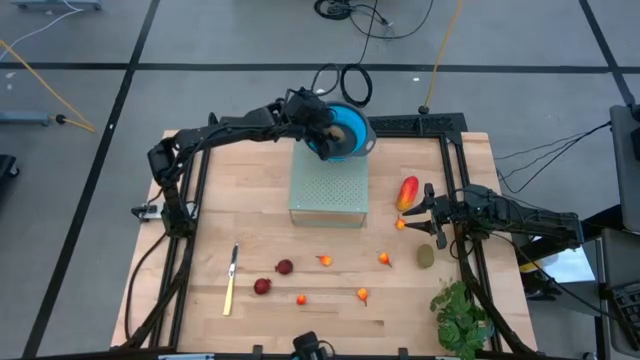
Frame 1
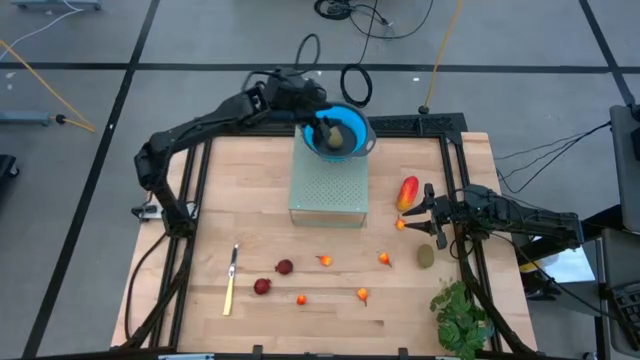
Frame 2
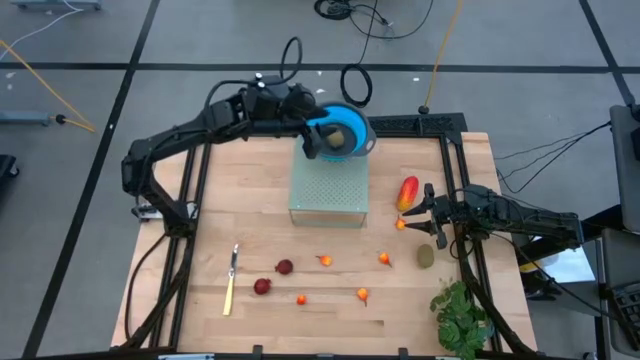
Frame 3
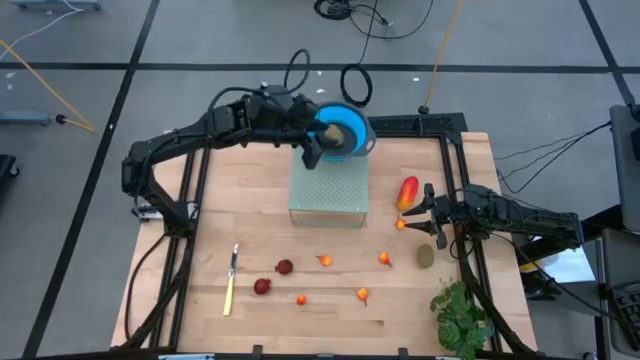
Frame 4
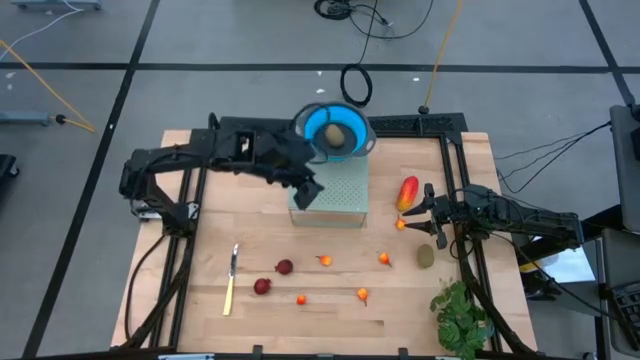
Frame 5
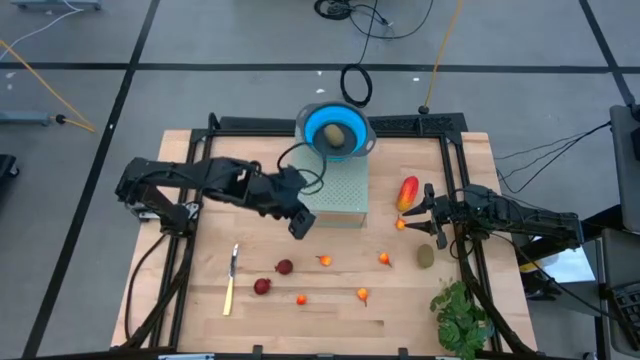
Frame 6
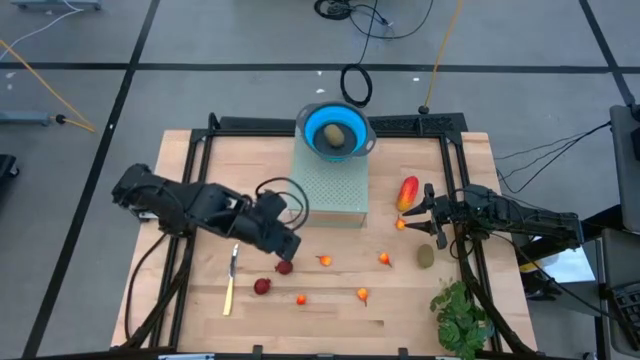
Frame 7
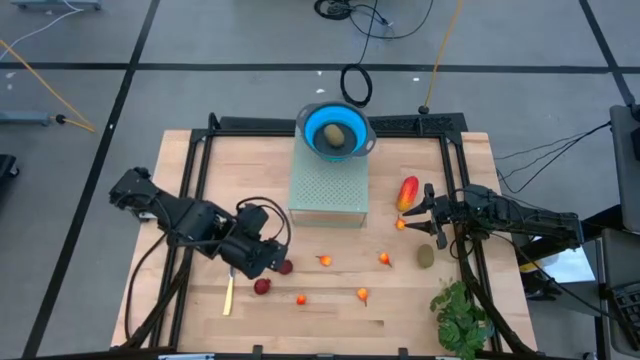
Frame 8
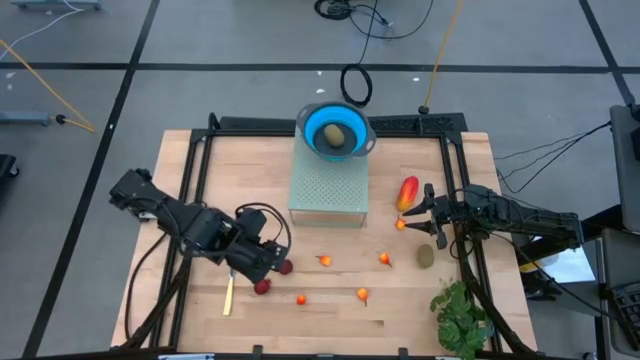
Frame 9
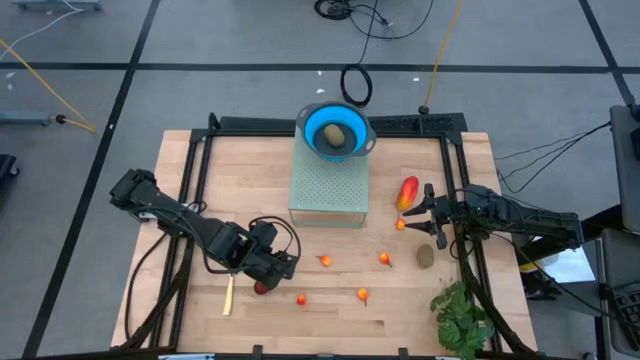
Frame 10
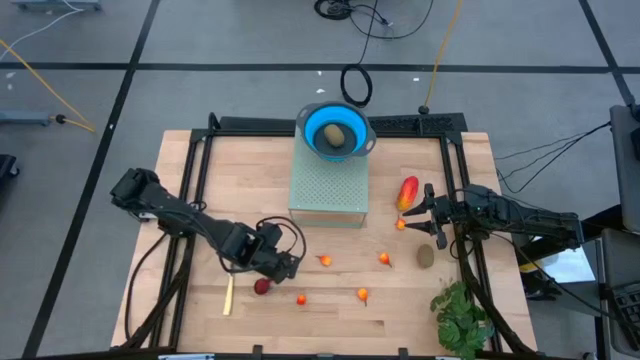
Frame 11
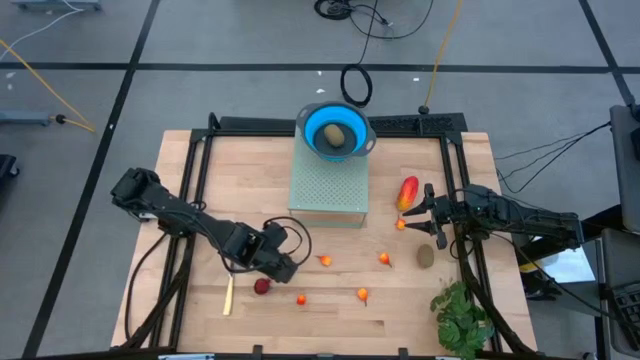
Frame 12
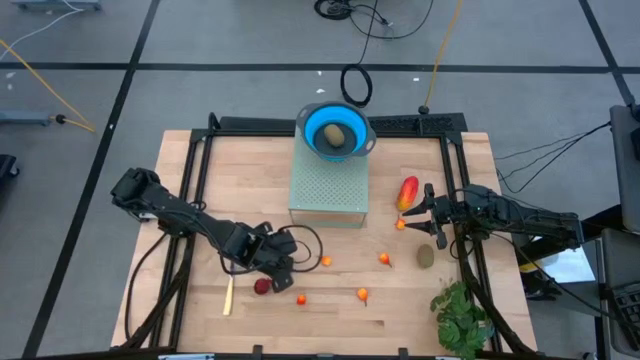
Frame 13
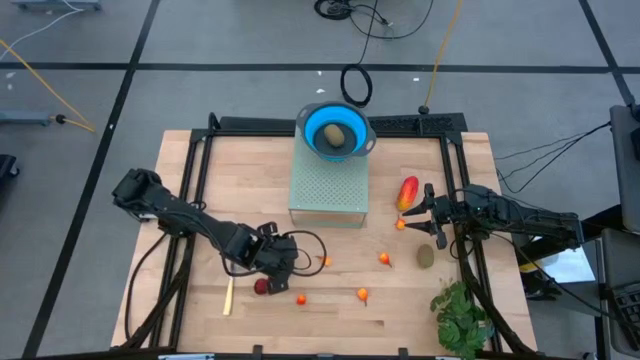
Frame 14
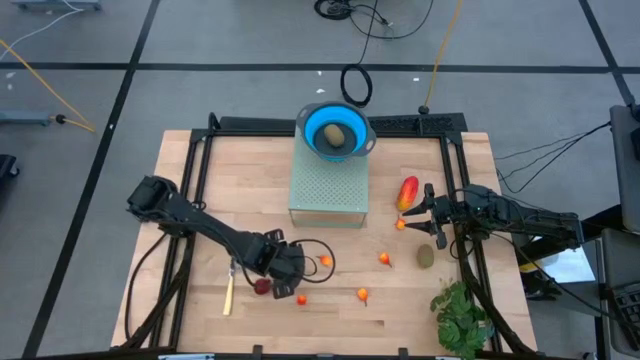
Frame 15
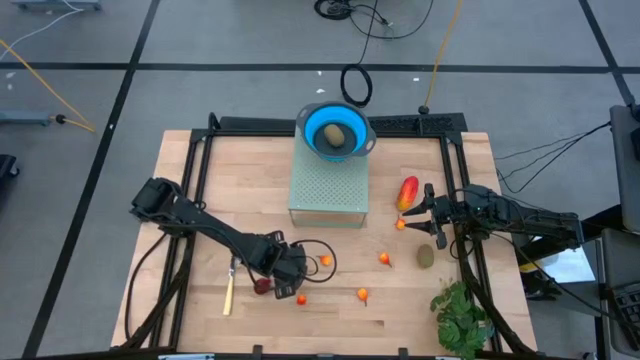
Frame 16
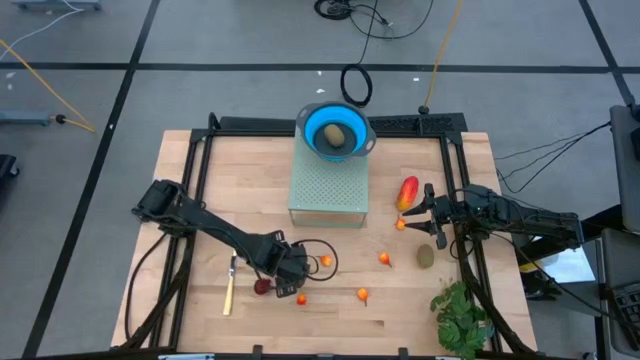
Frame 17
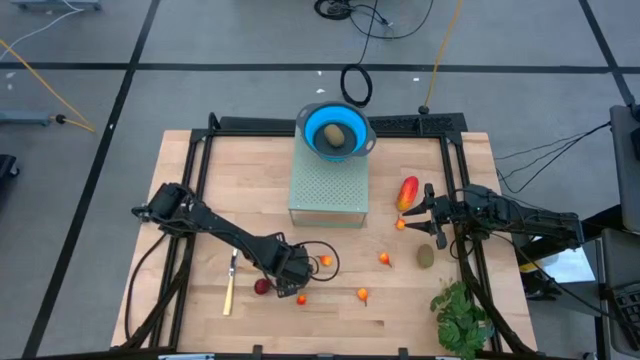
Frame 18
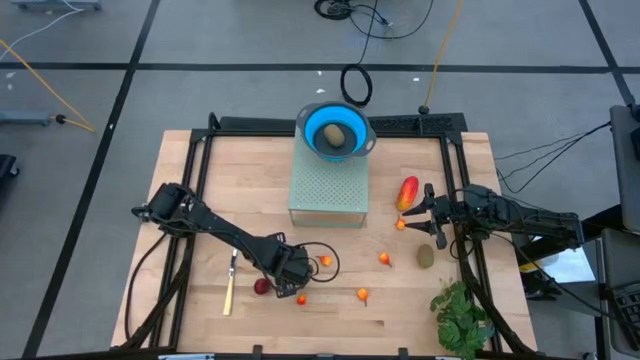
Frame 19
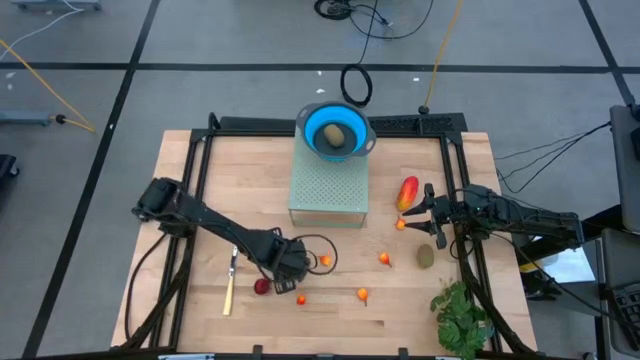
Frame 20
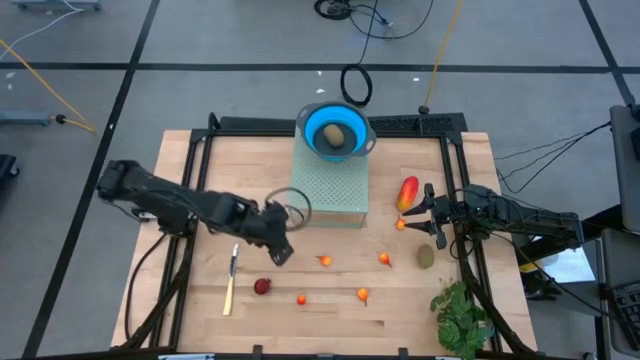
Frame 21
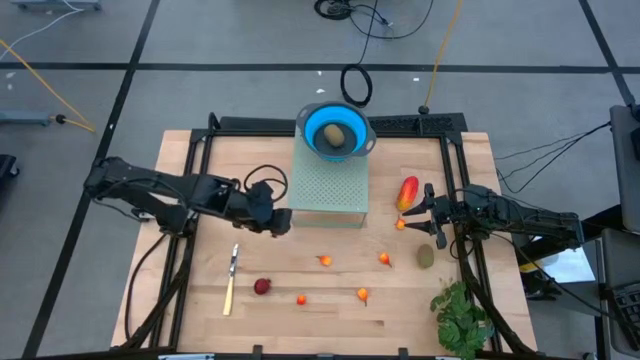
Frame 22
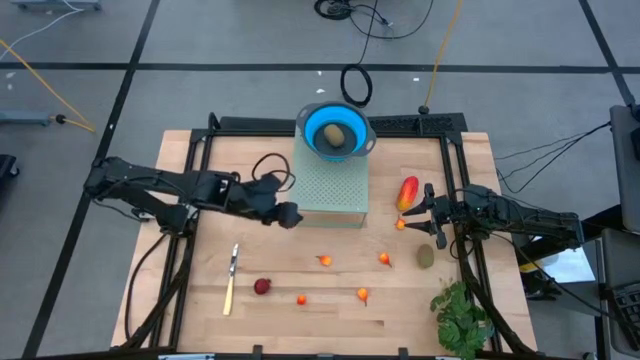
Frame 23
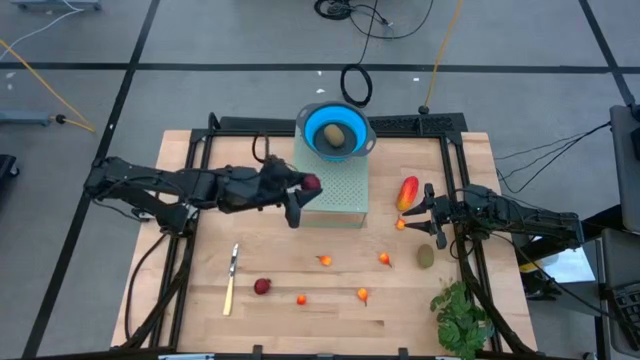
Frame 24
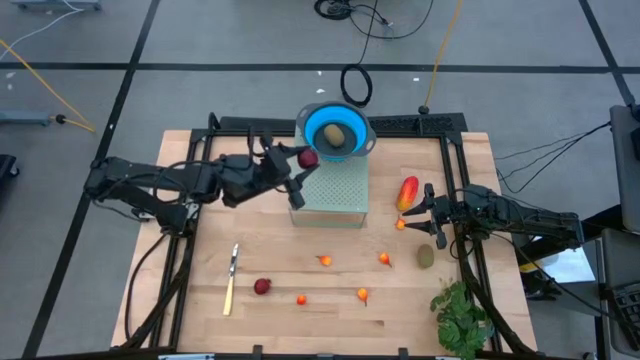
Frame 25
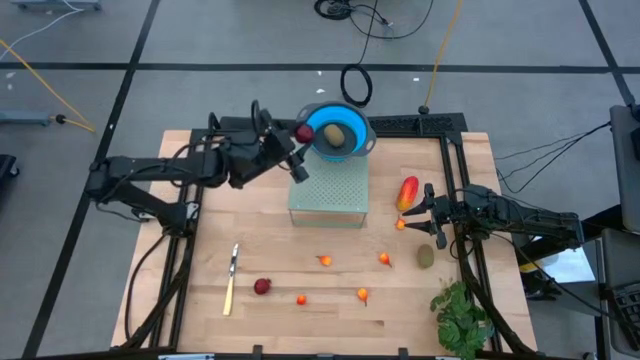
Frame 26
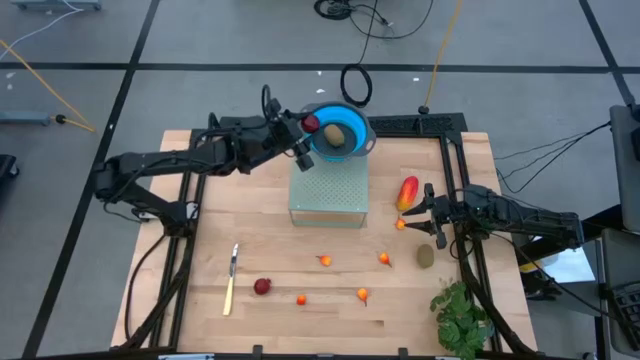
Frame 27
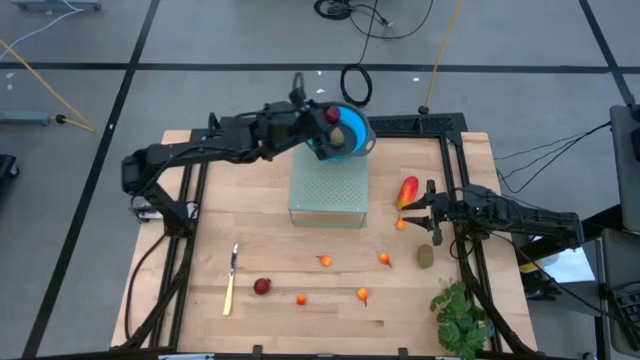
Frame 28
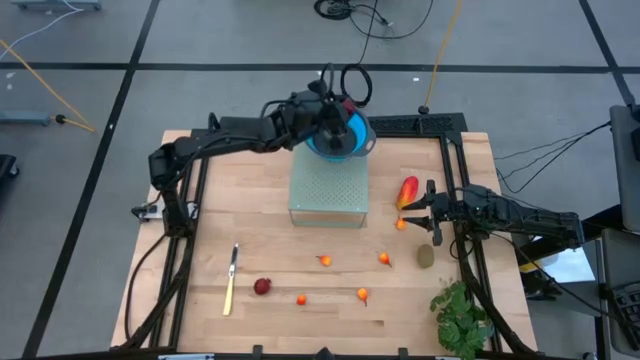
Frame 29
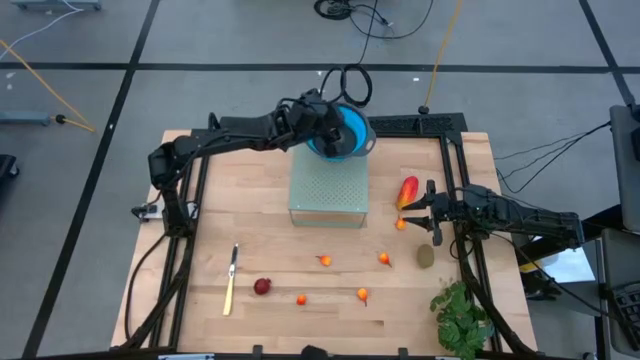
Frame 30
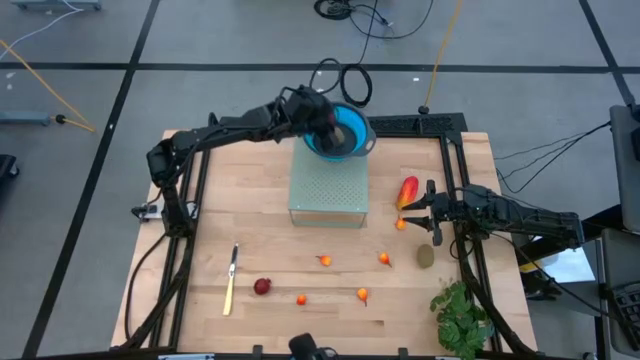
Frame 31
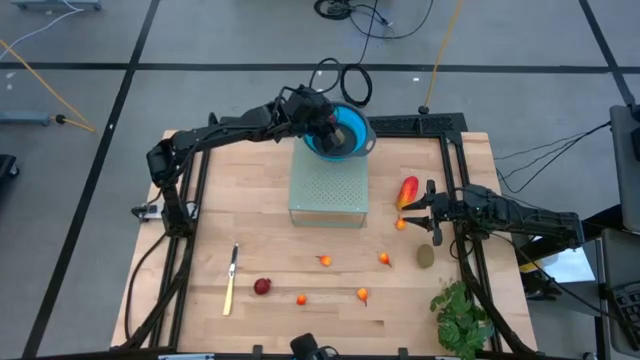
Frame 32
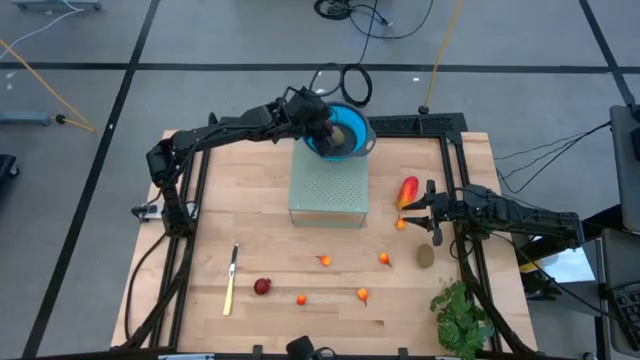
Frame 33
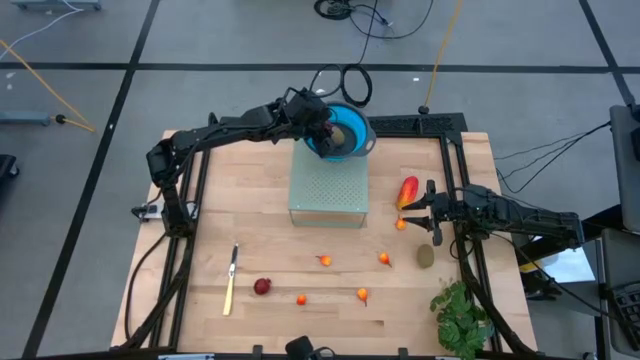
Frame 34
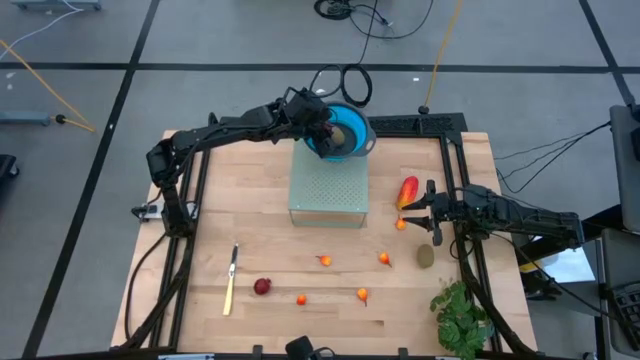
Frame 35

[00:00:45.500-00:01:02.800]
Task: Pick & Place Fruit
Put the pomegranate into the blue strainer bowl on the shelf

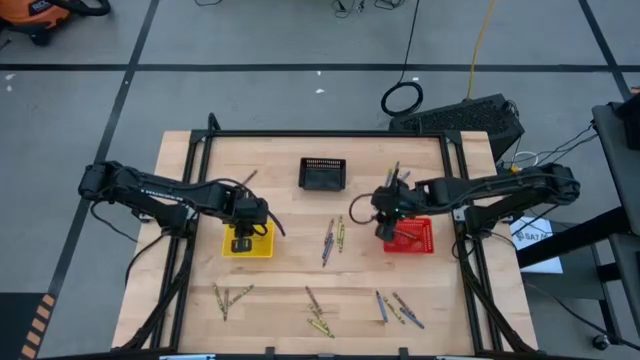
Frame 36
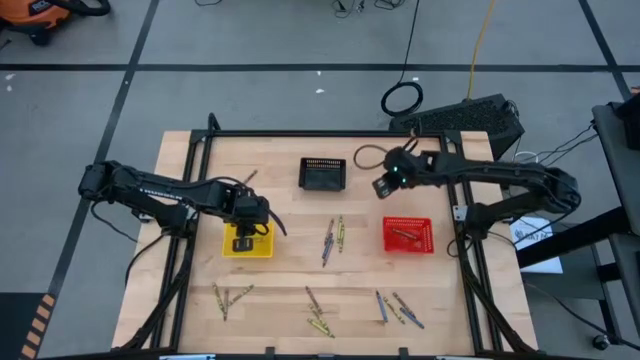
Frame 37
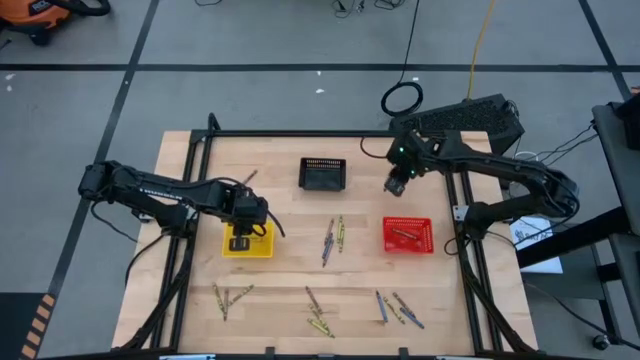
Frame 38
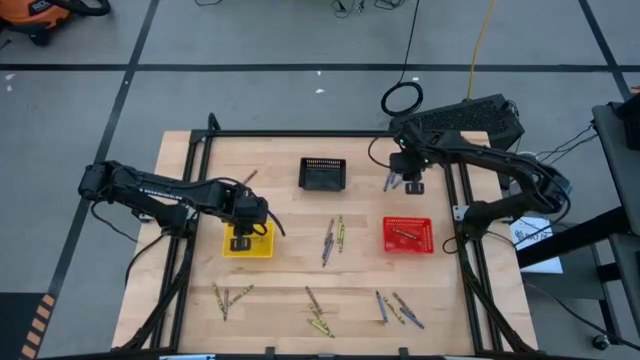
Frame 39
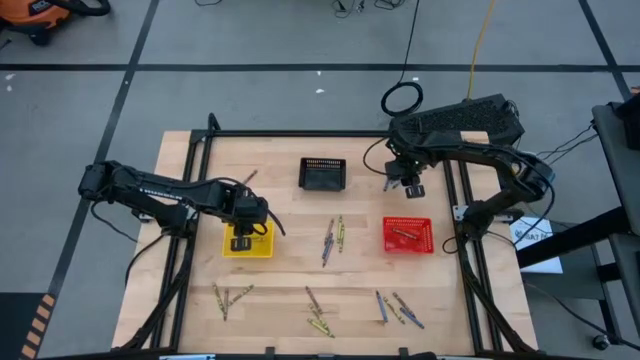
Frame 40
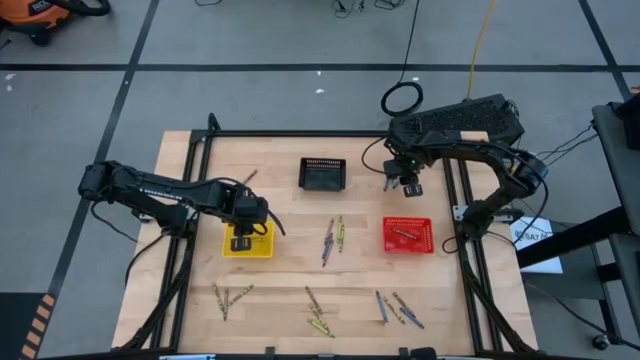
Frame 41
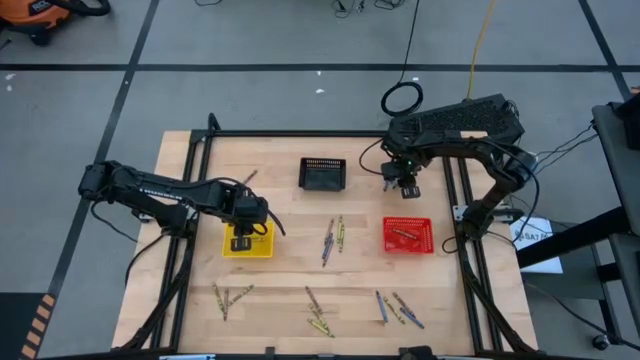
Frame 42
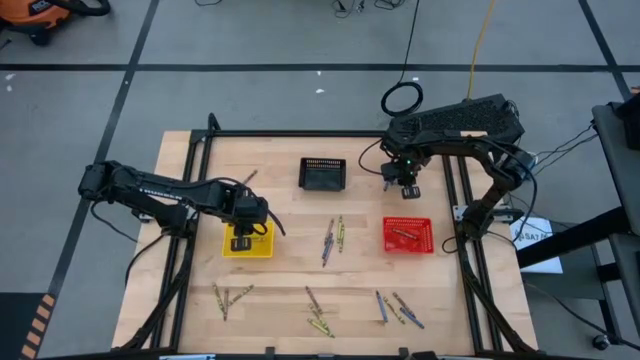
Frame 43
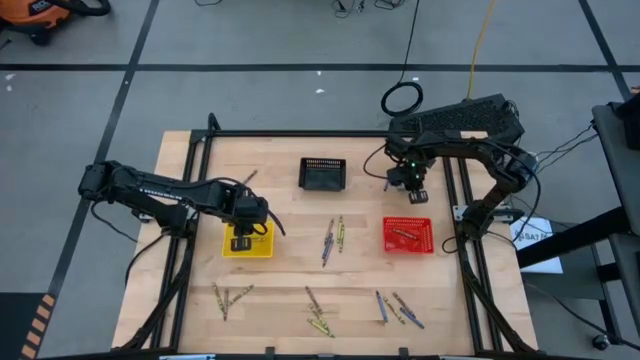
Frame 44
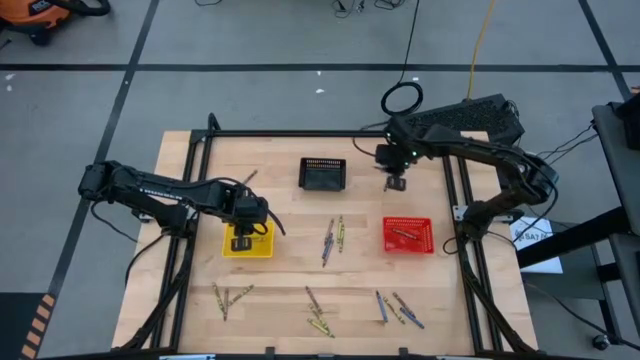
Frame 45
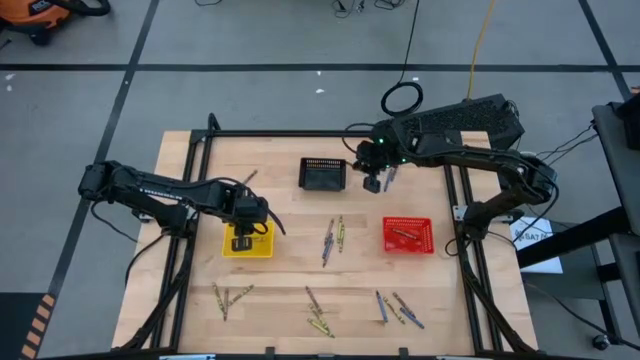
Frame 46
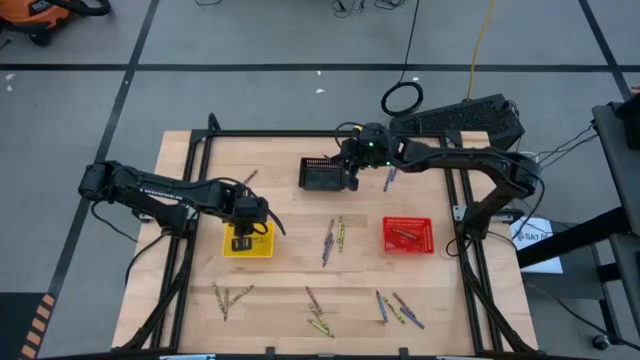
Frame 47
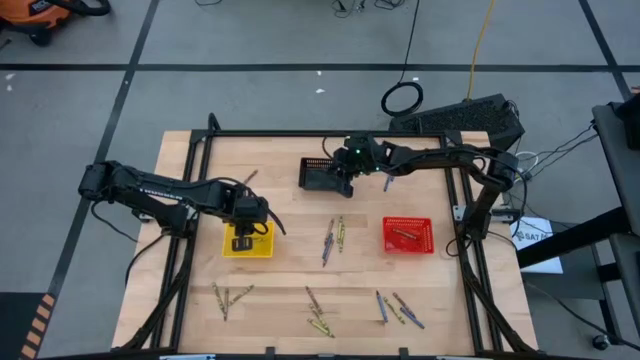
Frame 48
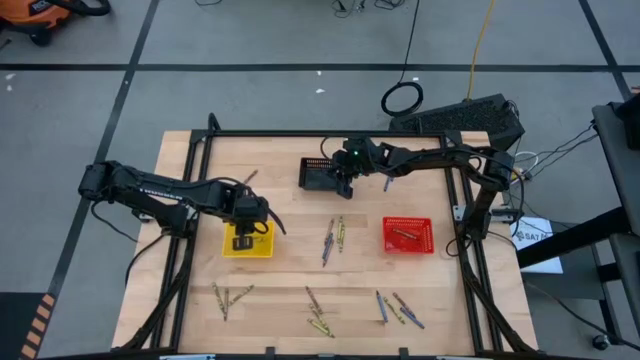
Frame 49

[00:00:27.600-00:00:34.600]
Task: Sort crayons
Put the blue crayon into the black bin
